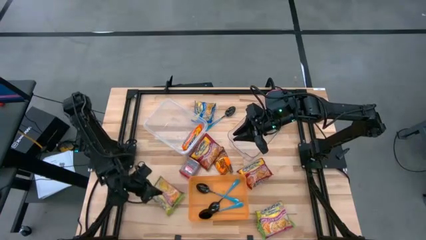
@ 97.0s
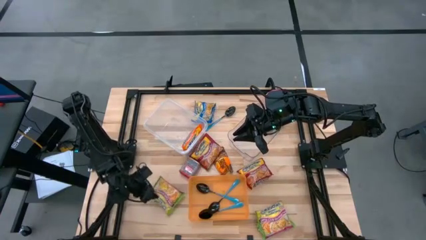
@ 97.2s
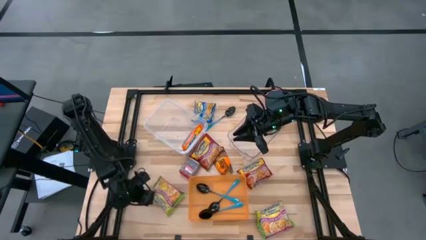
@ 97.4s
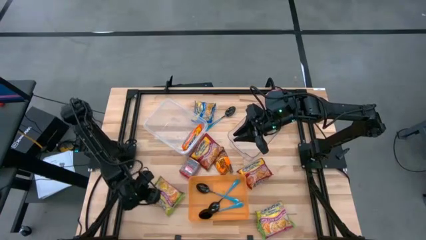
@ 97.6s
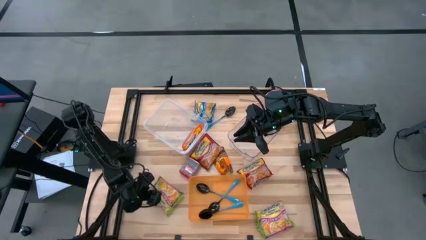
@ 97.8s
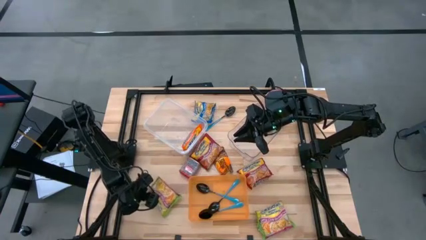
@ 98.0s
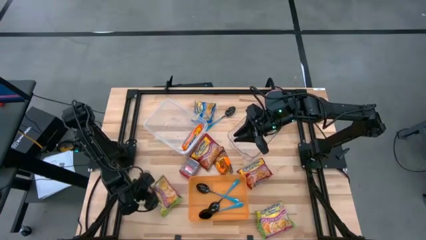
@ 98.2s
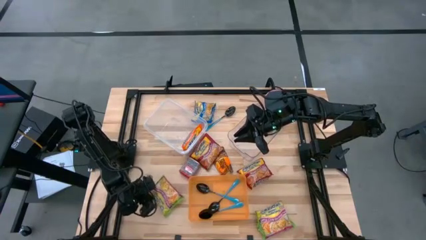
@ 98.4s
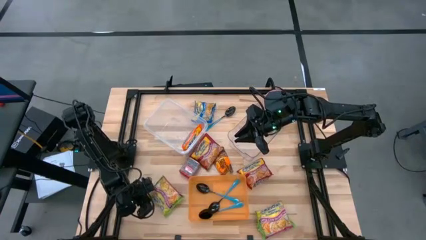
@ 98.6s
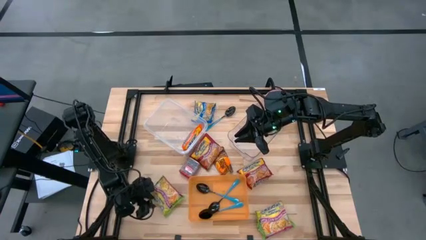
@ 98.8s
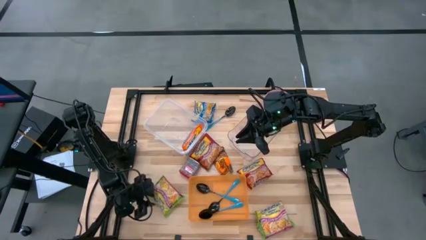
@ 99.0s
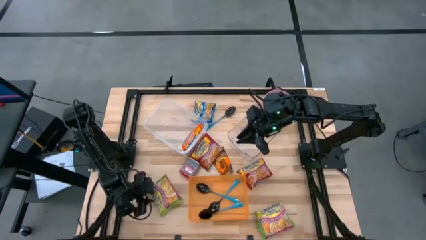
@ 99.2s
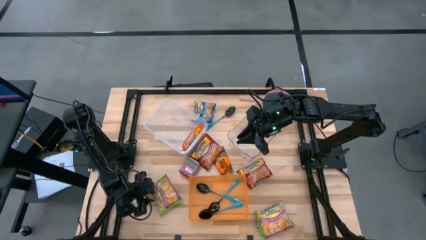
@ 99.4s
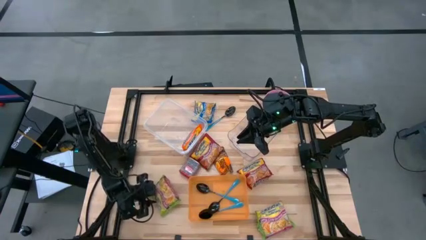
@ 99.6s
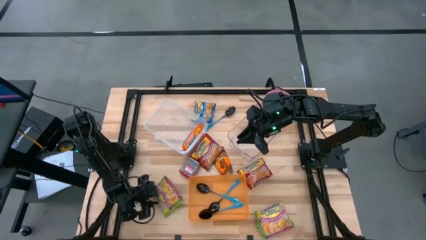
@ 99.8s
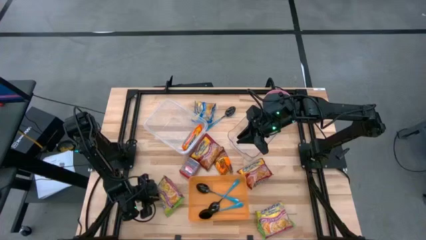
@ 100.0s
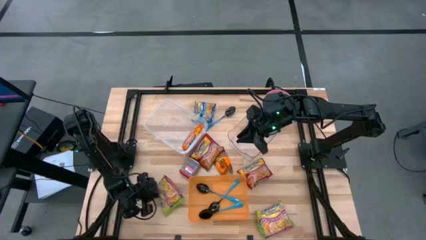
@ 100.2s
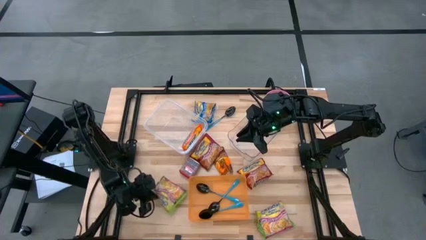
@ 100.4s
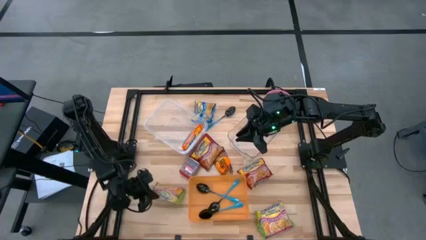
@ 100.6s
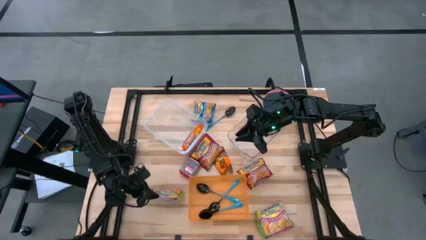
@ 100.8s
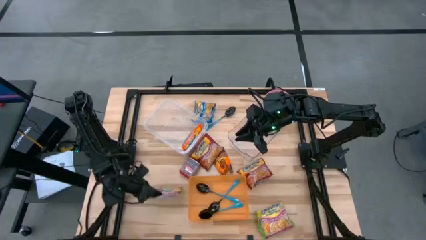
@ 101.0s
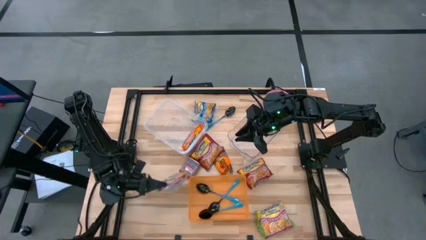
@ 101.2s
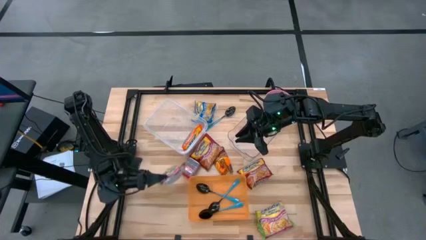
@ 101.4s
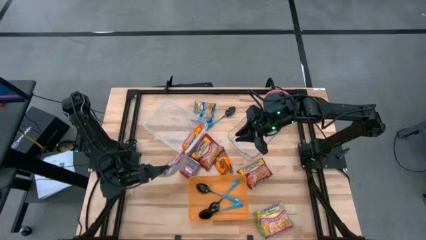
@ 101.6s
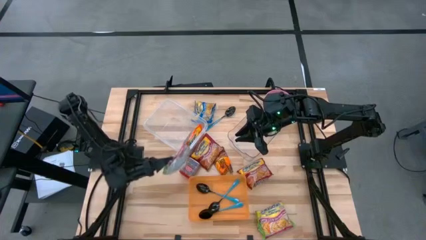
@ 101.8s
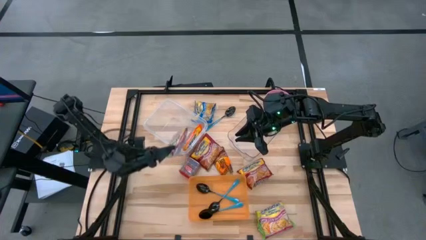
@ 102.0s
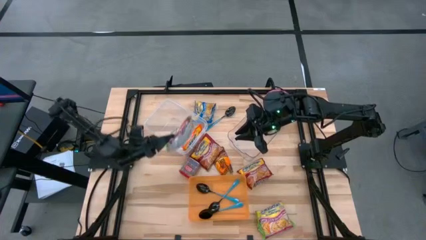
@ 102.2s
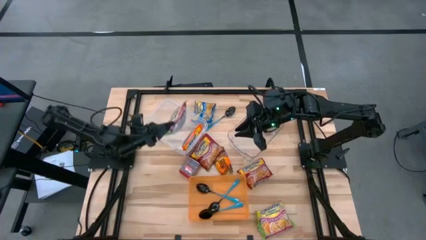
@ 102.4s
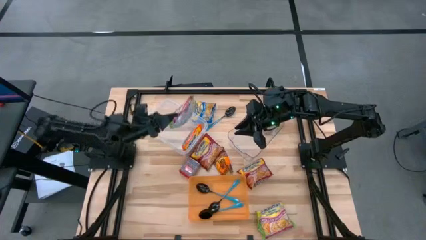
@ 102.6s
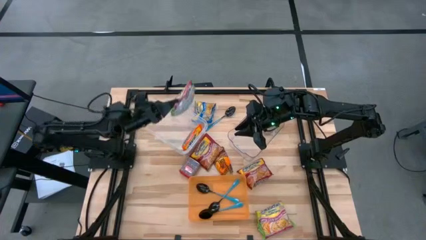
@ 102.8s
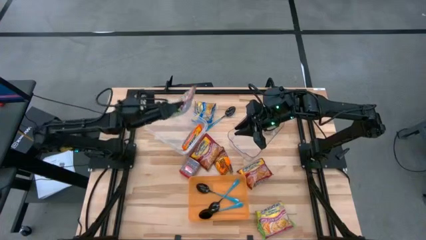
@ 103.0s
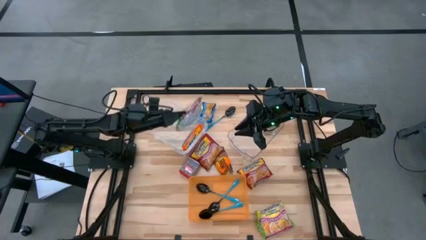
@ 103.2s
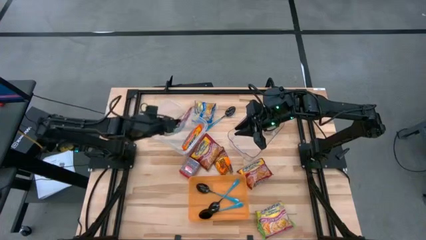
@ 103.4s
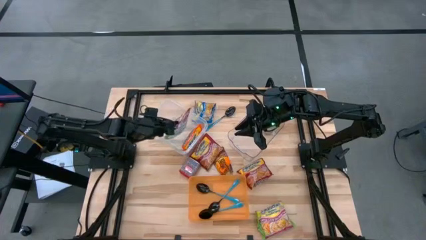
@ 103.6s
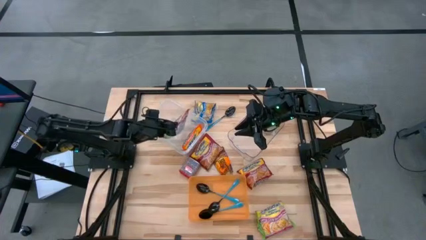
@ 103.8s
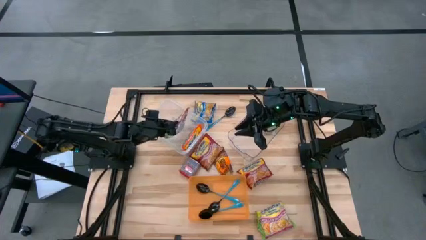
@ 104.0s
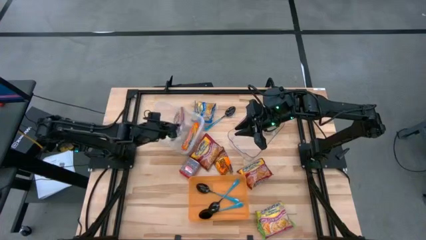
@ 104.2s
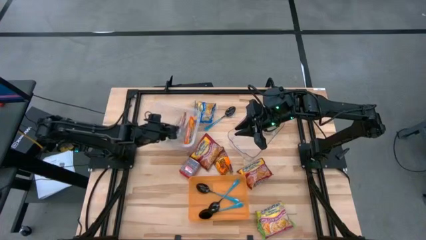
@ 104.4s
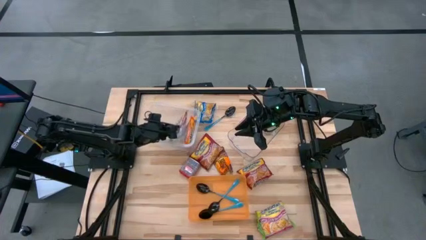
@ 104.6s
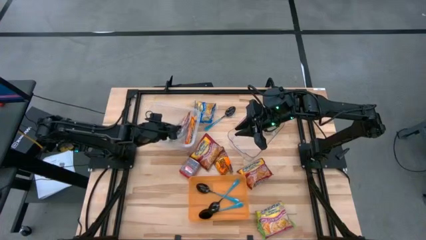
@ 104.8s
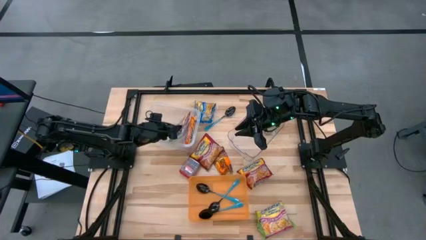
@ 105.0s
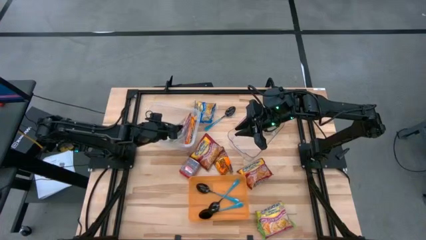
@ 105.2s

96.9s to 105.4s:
Task: Pick & Place Food Item
Put the green noodle pack into the transparent container

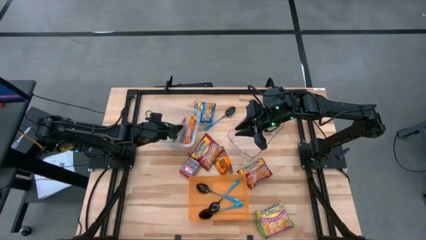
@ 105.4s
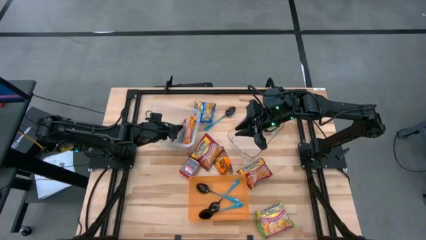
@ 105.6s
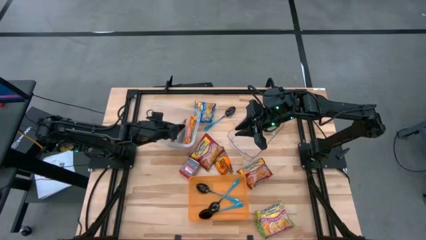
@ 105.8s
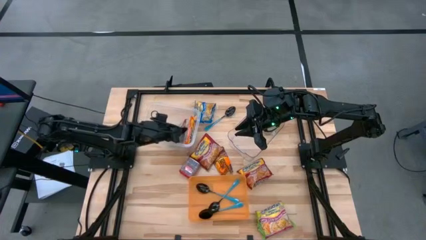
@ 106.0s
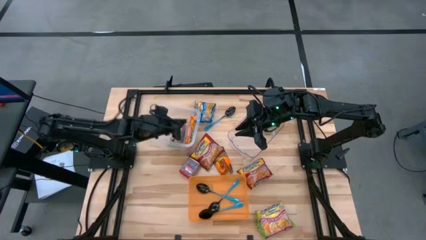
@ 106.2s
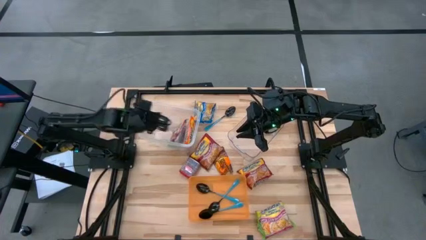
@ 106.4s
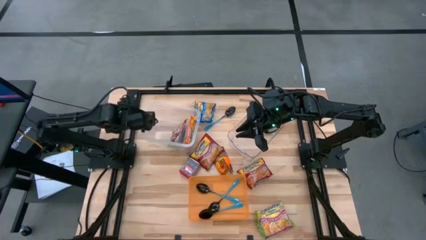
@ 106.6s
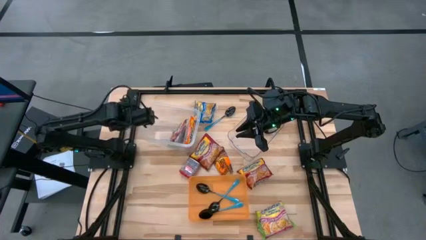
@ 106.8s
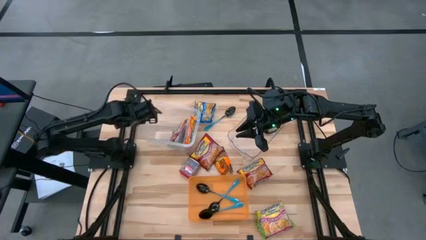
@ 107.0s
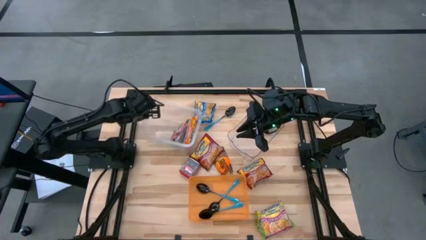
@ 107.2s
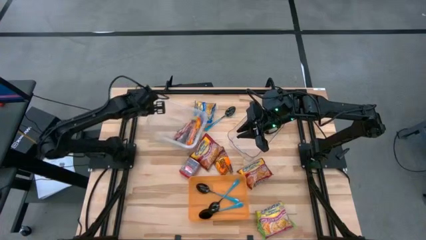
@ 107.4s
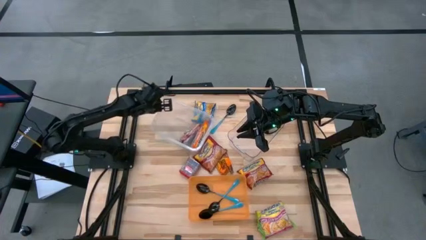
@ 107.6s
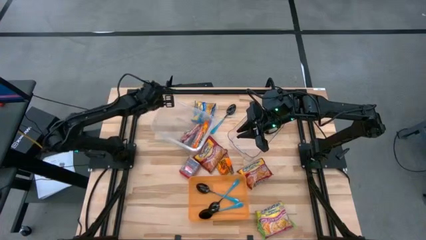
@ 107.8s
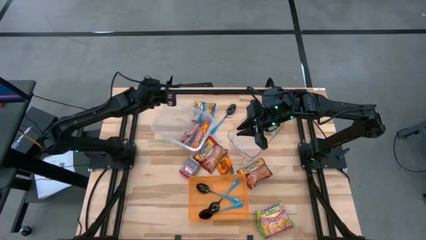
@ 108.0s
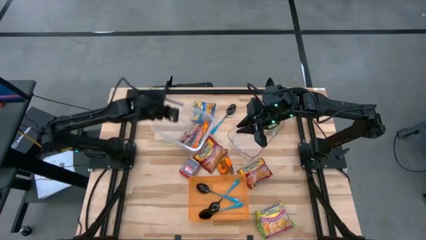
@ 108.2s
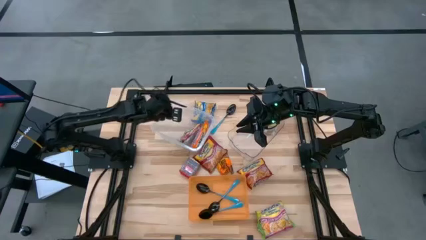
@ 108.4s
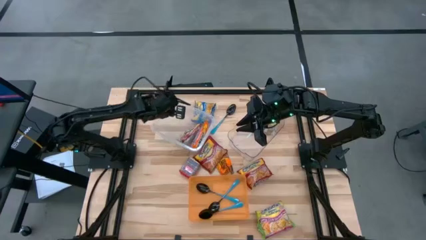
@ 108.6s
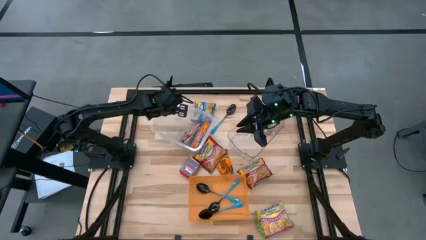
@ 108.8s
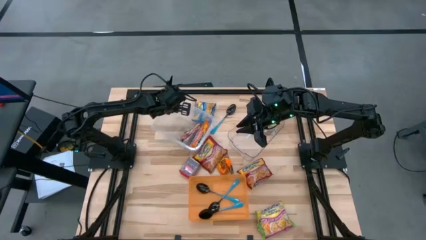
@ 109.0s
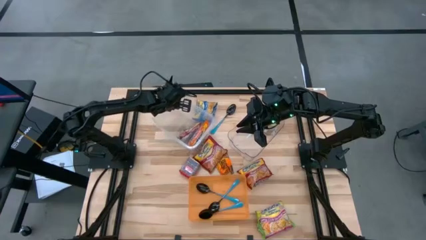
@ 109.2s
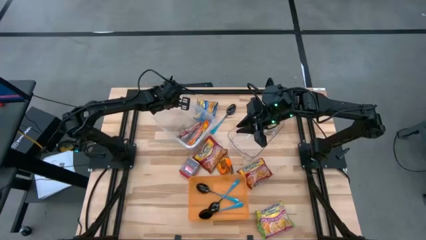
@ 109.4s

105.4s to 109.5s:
Adjust the transparent container

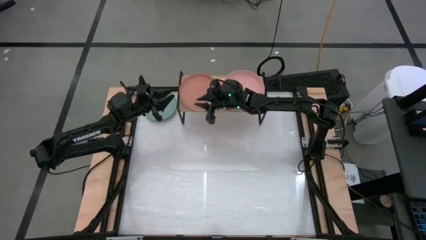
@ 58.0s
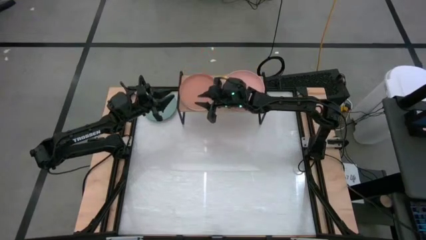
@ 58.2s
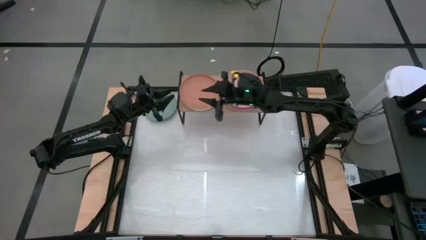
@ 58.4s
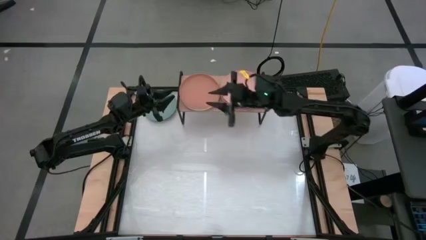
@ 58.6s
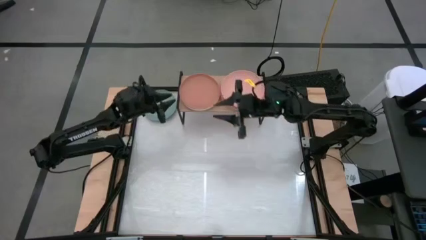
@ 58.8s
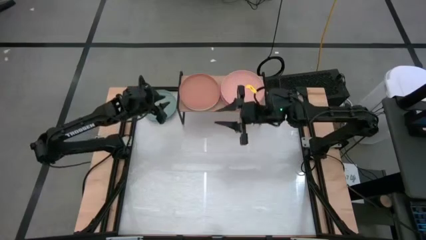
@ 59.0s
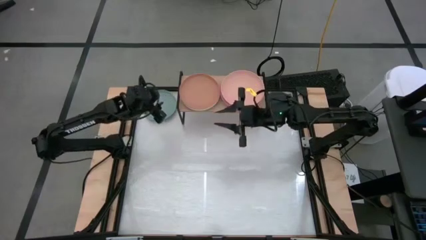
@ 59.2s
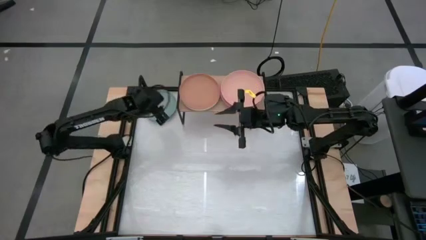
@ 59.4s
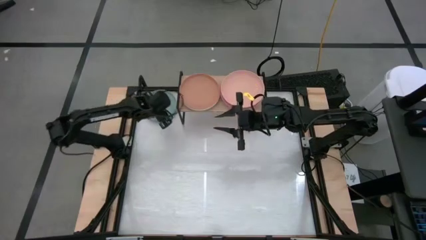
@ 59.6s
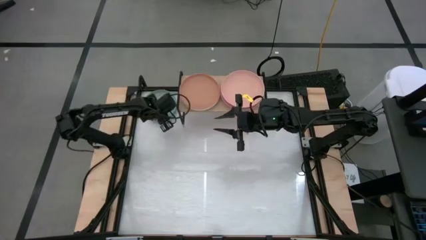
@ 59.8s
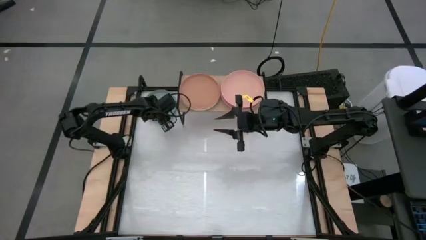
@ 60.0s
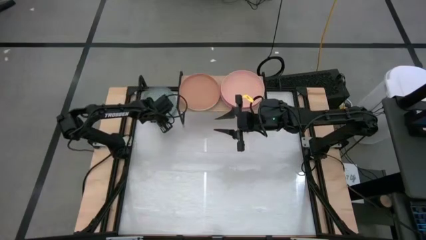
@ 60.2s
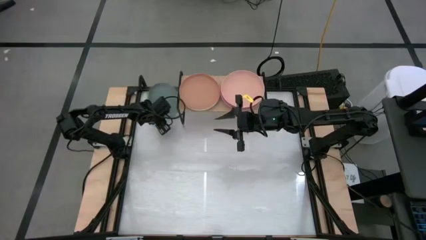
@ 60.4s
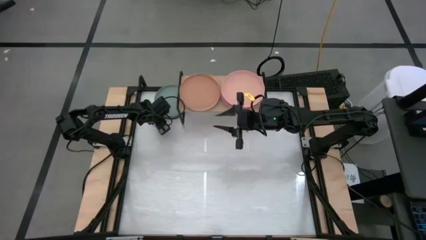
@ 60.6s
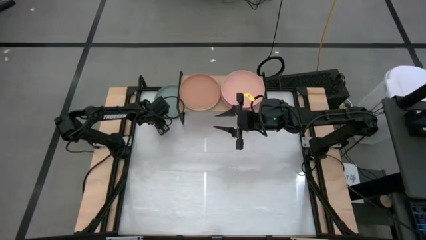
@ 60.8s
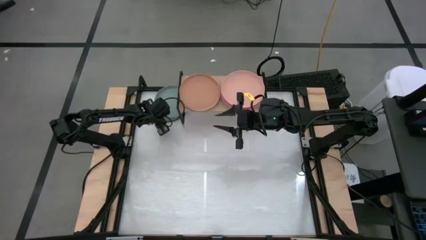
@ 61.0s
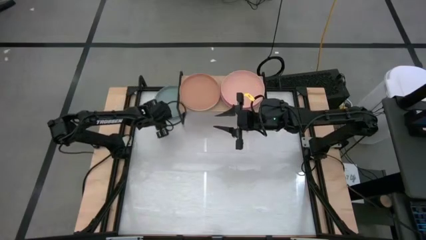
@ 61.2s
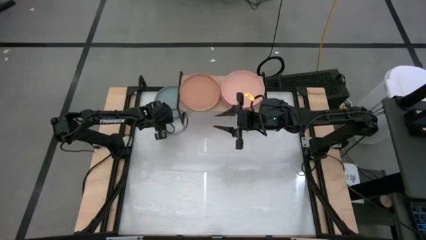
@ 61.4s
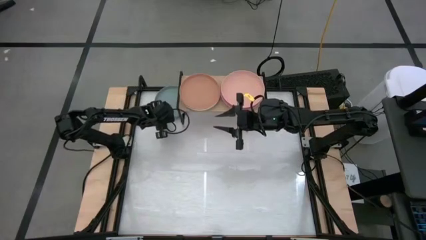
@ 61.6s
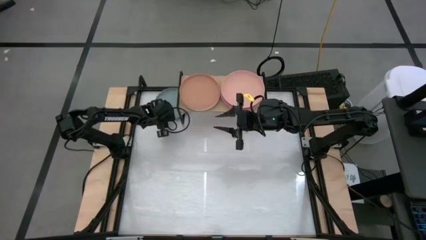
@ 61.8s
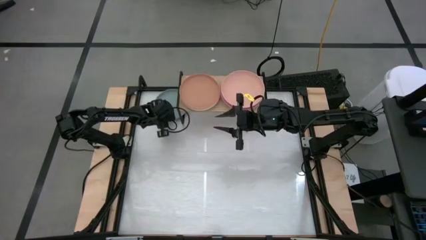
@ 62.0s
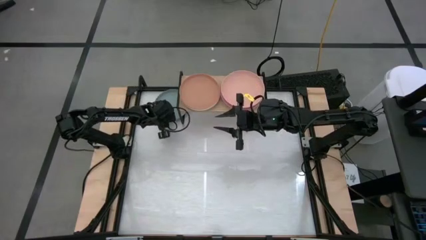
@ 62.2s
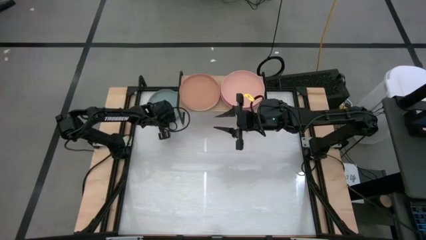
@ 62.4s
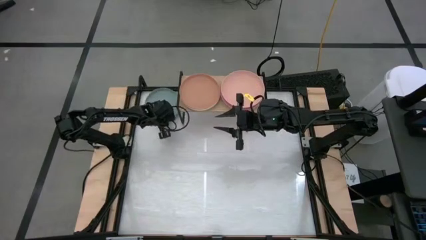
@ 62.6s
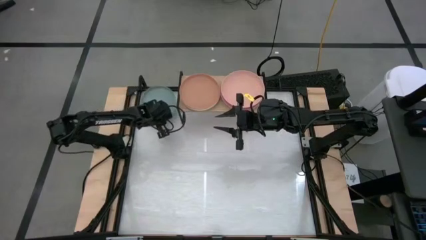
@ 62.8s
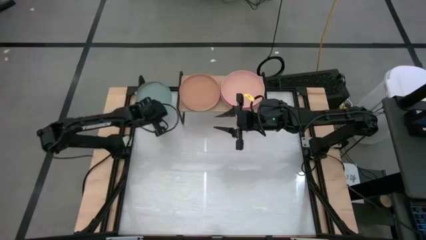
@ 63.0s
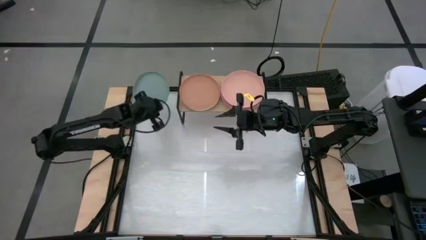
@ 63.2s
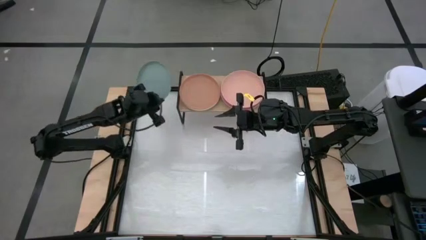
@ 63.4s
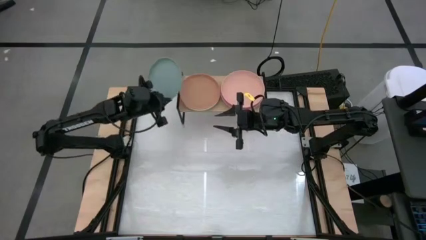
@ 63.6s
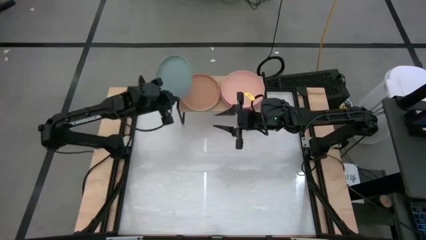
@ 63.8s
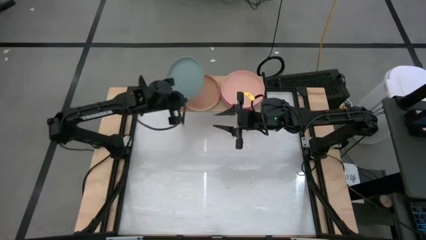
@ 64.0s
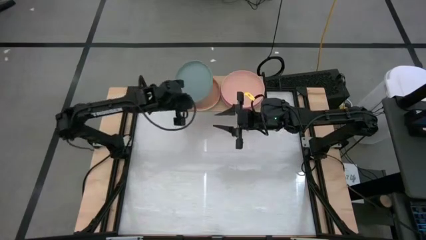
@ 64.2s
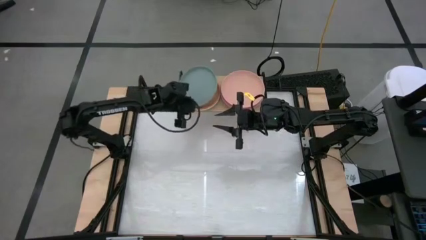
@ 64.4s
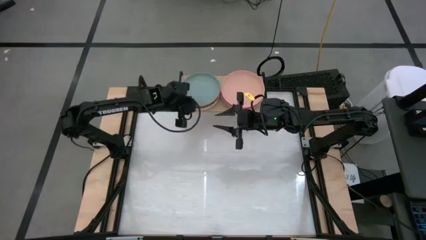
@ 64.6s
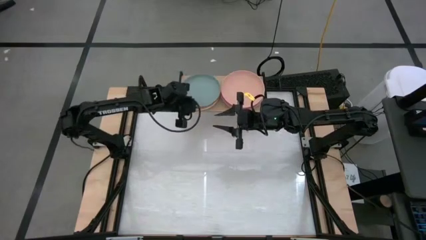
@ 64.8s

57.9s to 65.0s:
Task: Place and stack plates onto a shelf
Stack the green plate on top of the dark brown plate on the shelf
